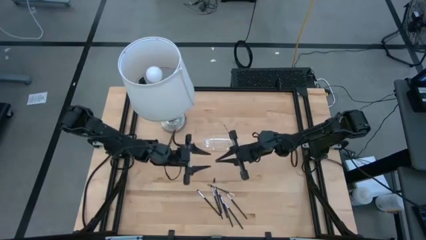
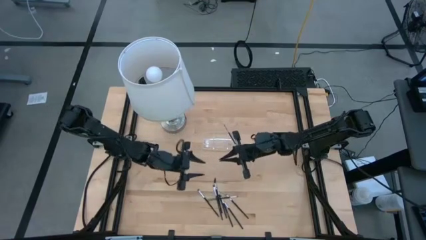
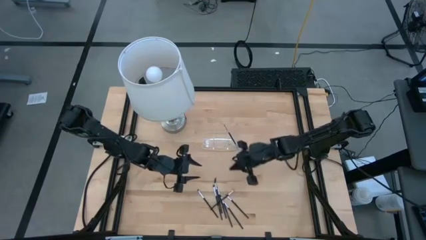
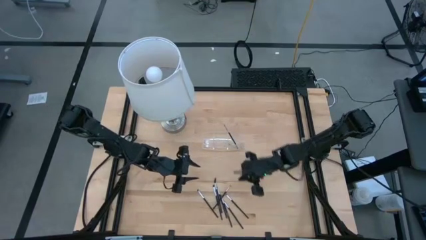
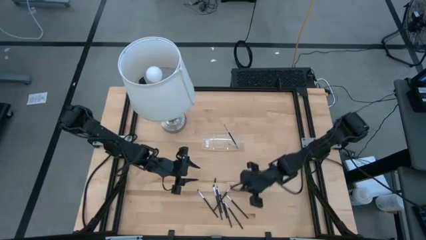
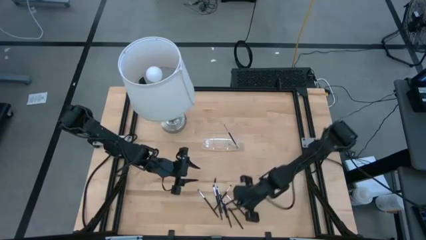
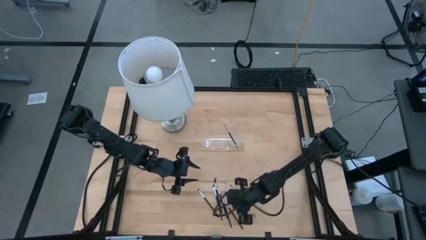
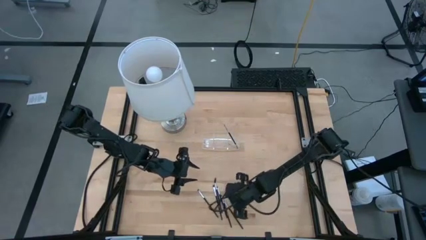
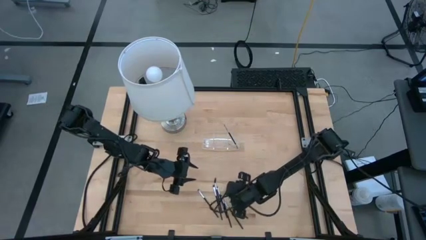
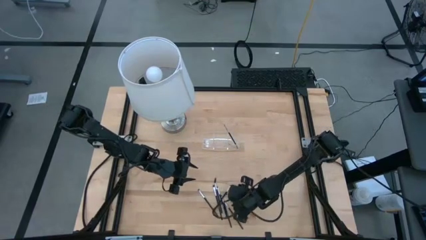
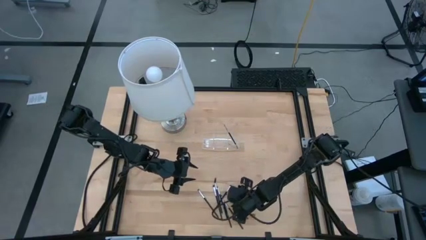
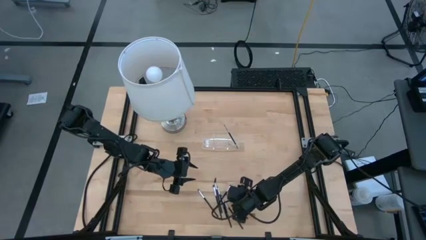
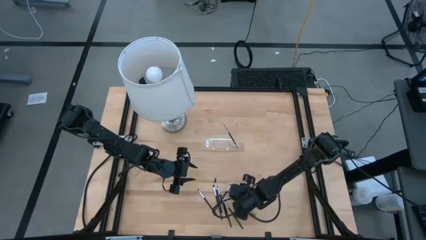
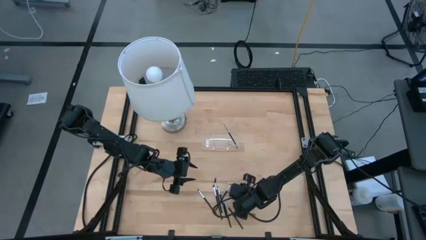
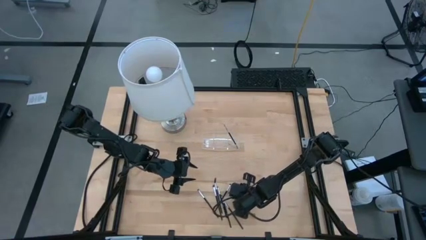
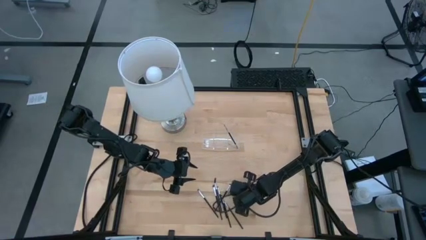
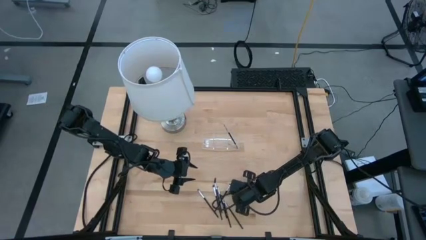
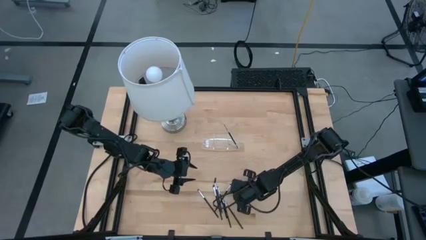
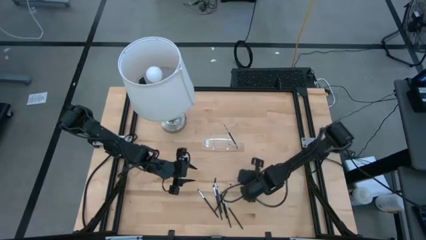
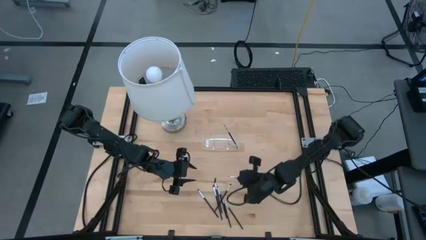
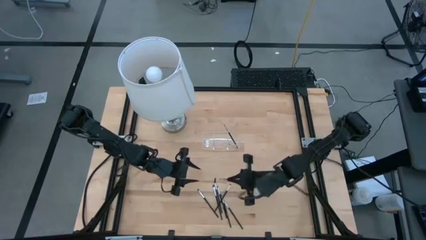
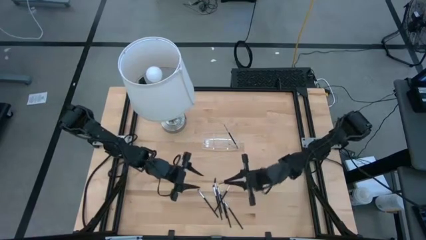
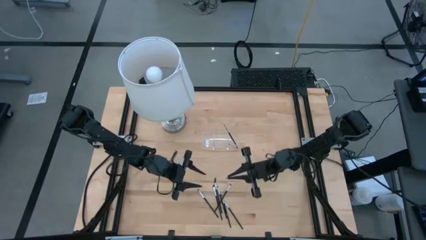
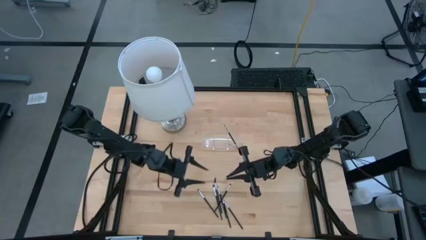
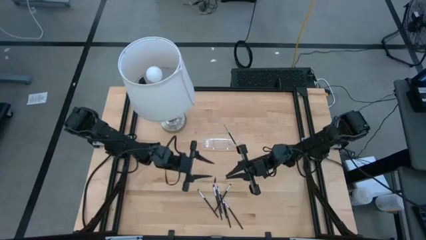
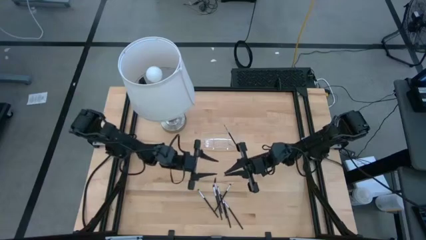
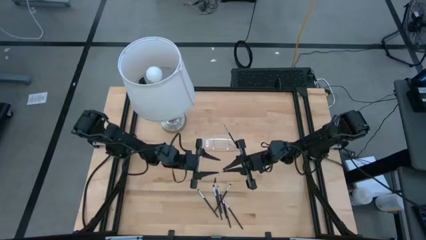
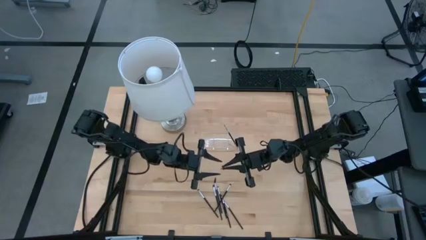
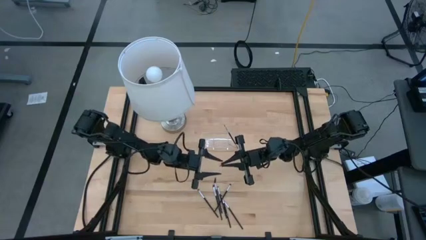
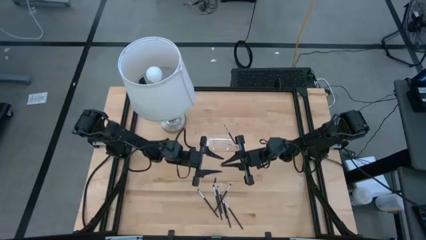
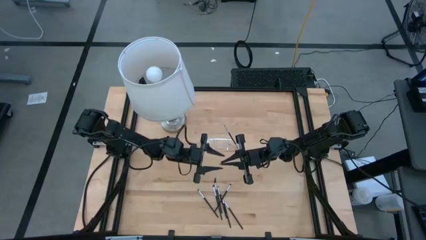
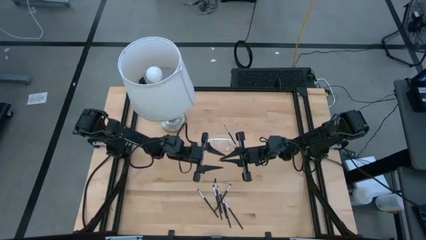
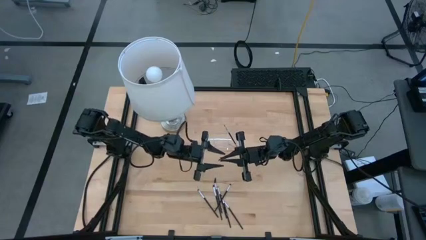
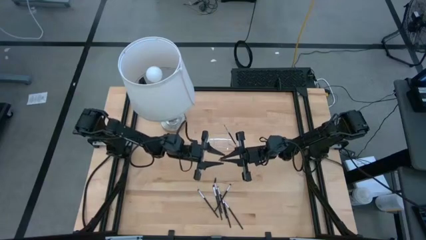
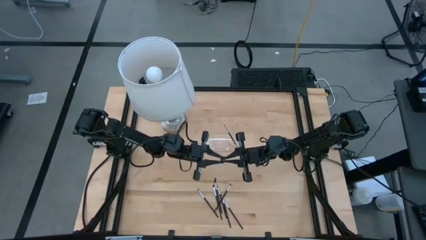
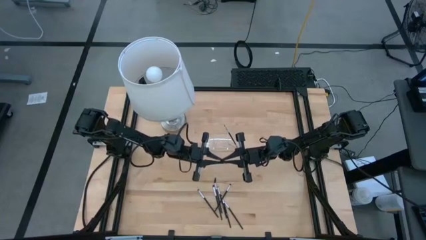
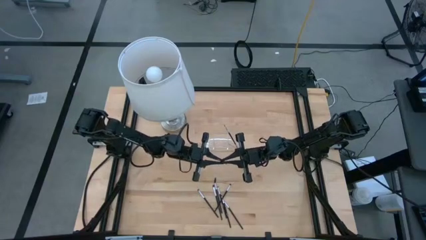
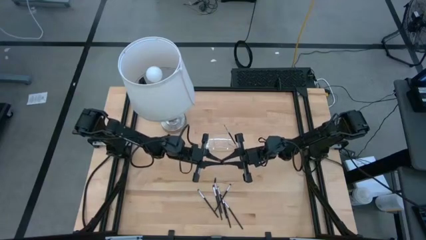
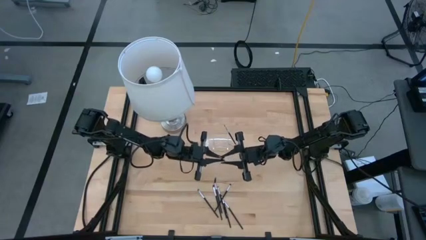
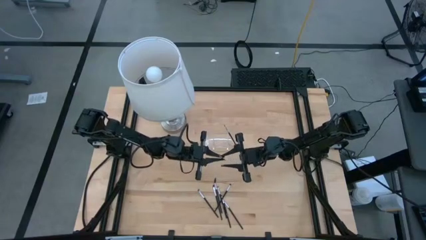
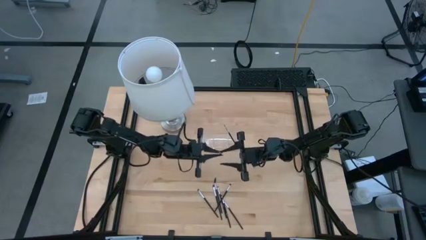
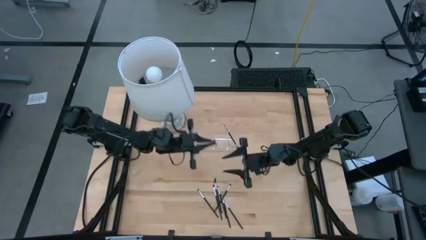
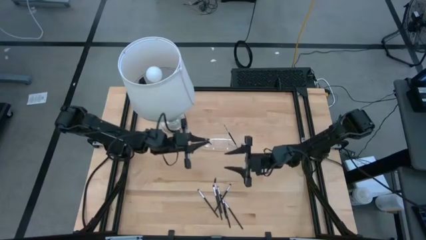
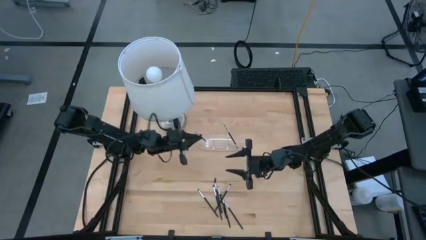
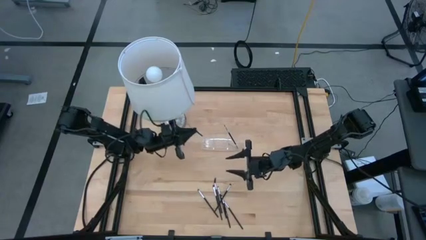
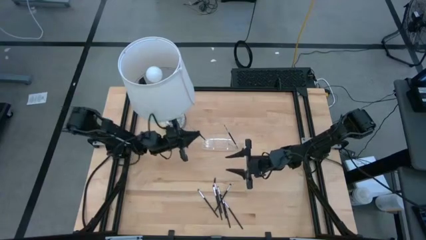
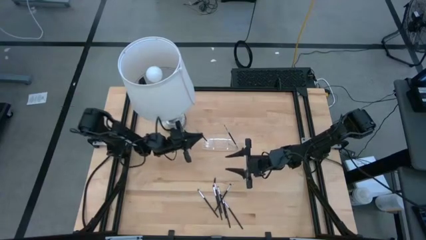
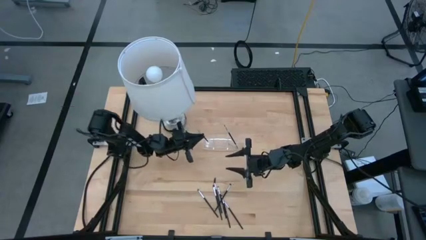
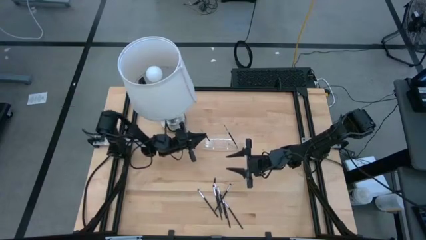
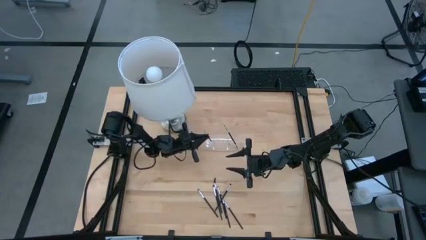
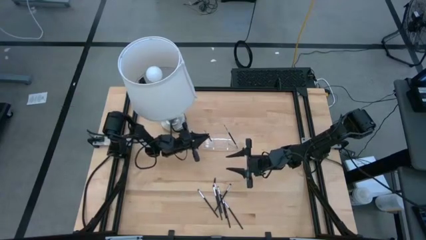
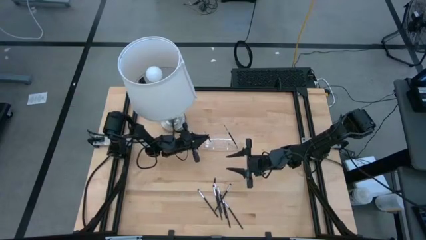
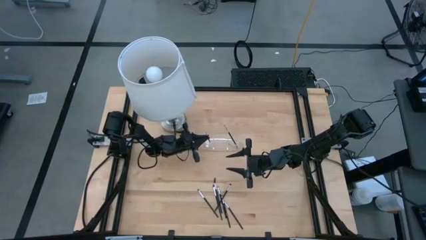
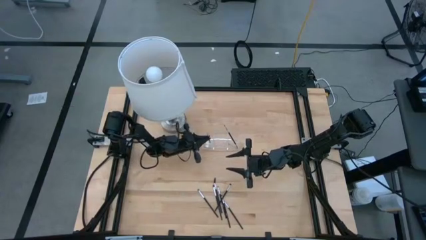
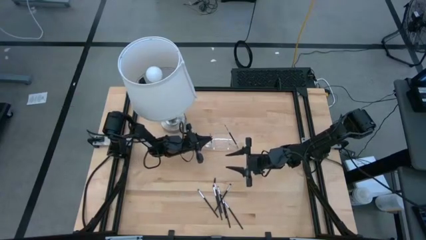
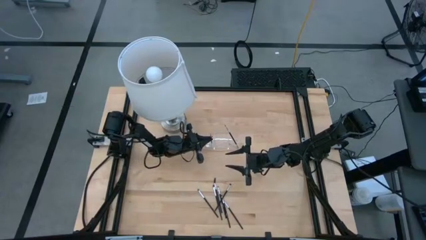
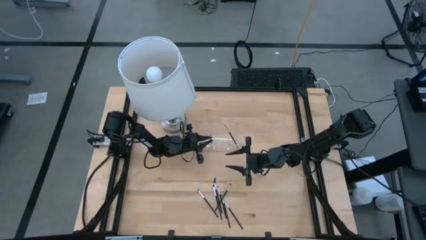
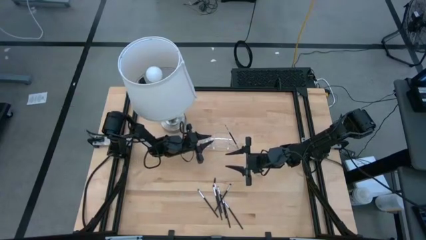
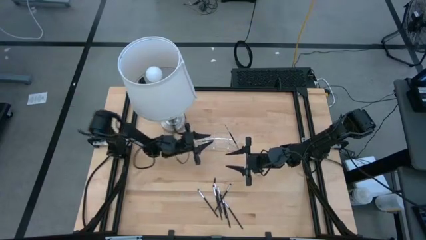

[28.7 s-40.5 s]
Task: Sort items
Put the eyeshadow brush into the transparent organizer

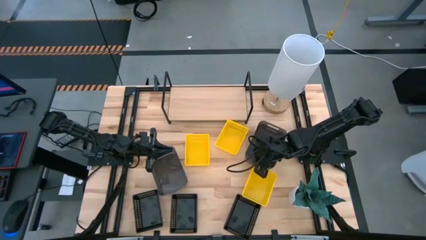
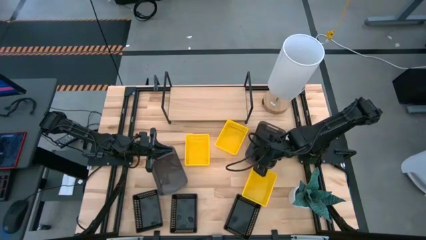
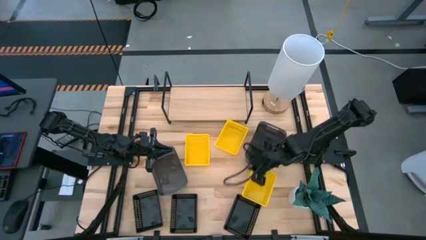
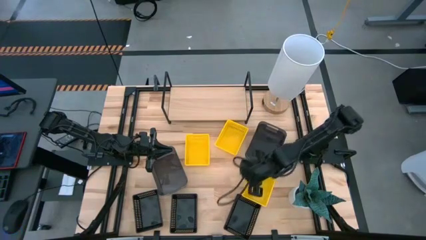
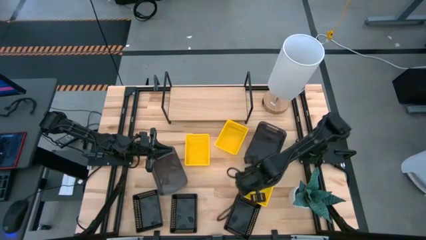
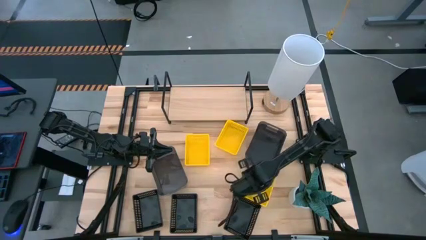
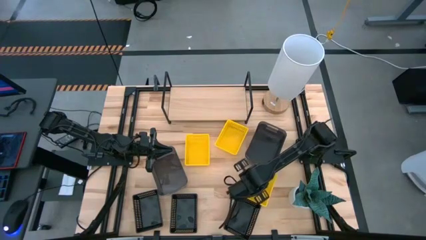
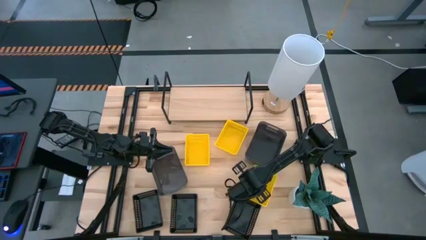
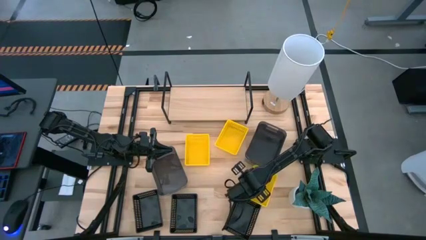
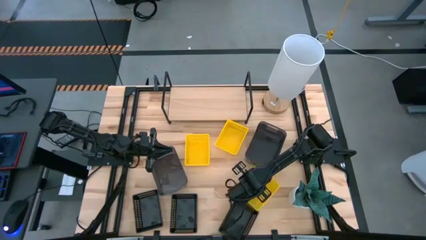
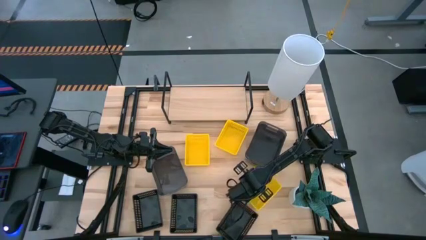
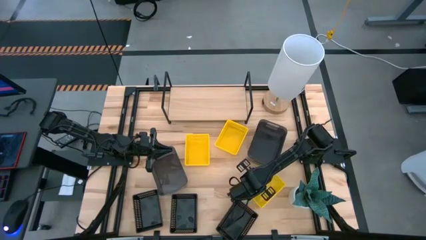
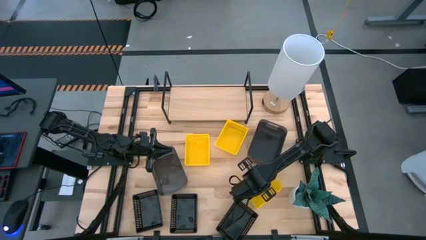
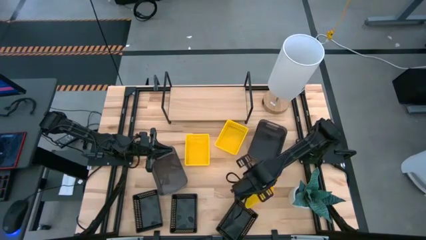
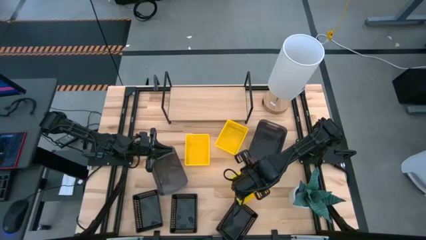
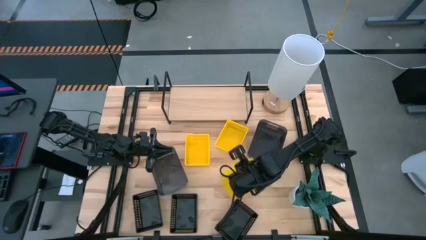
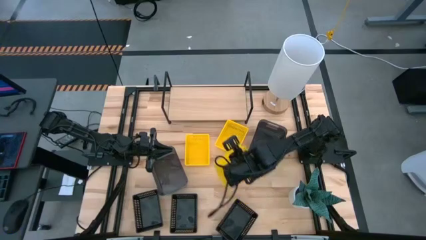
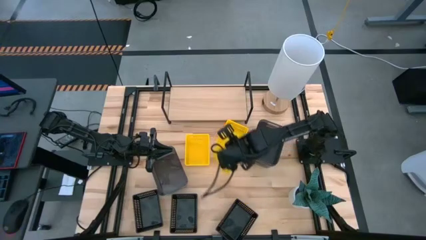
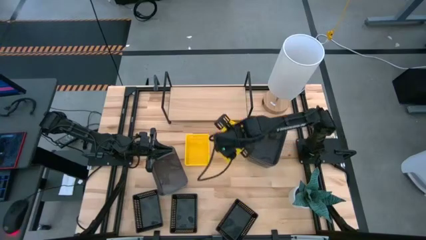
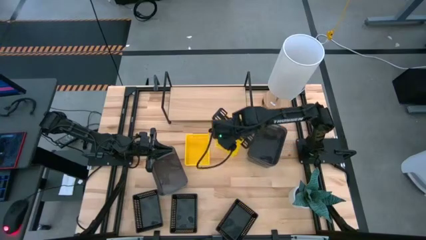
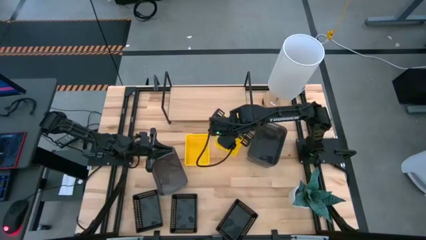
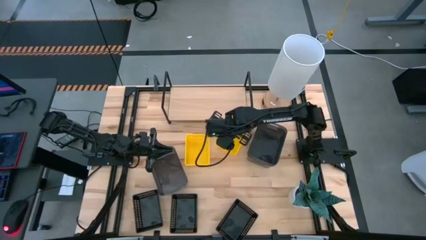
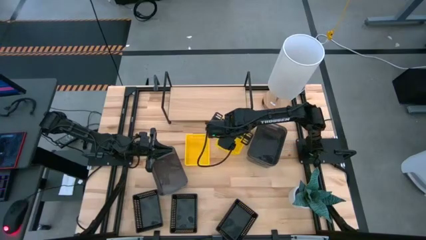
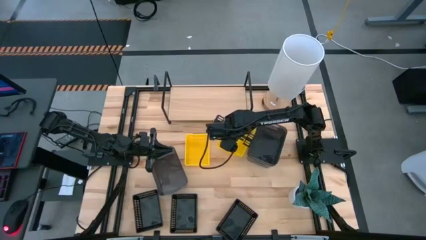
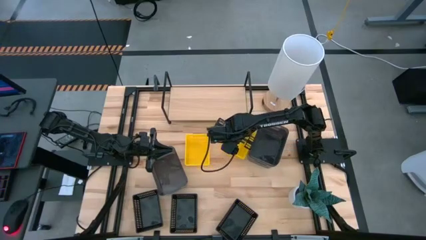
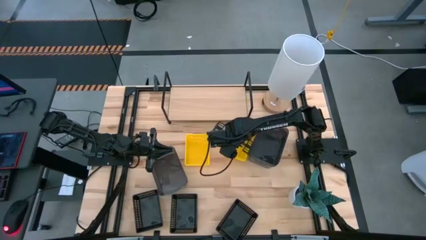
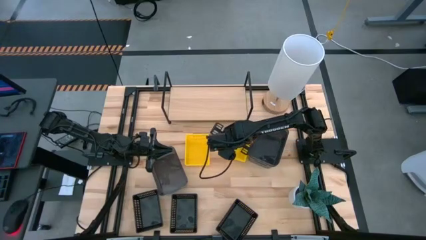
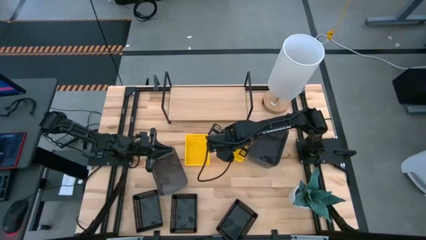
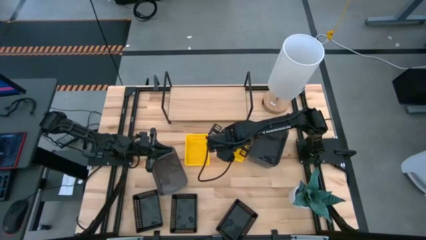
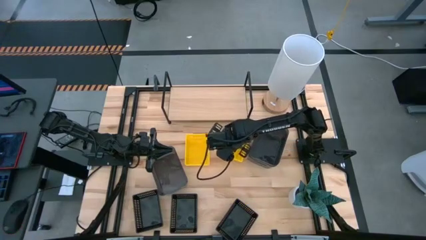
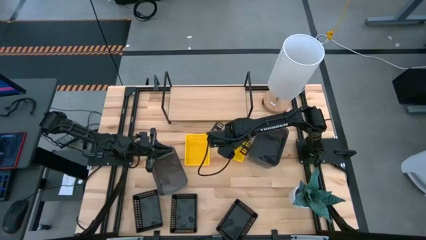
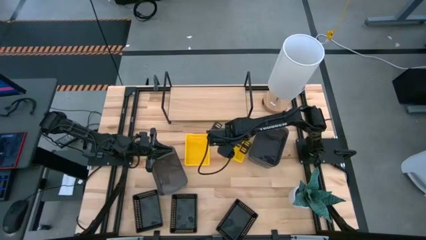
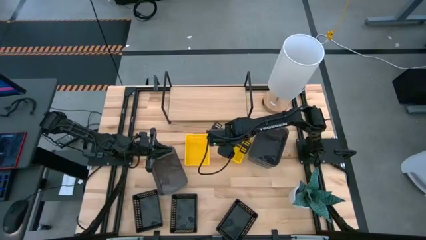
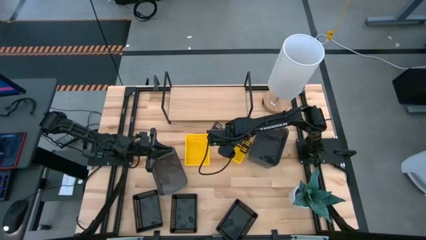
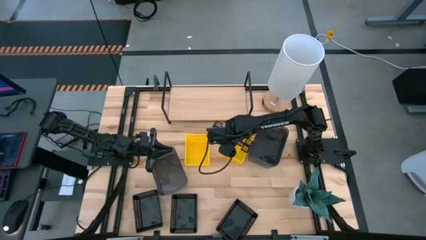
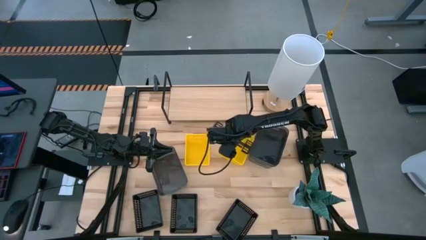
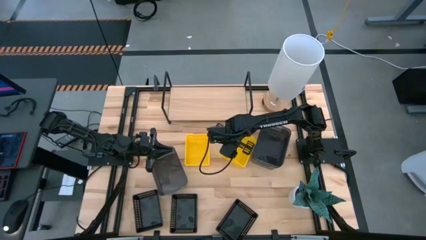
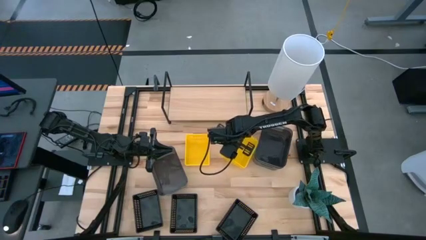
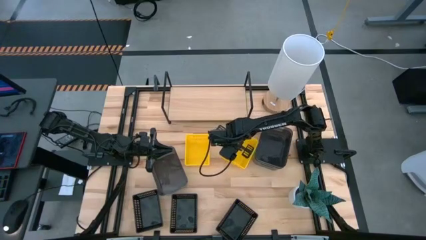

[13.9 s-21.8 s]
Task: Stack baskets on shelf by color
Stack the bottom right yellow bin on the top right yellow bin
